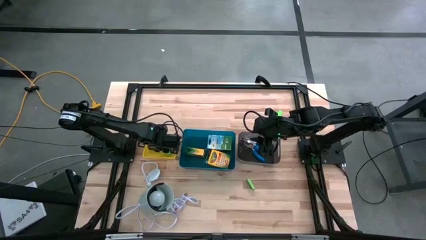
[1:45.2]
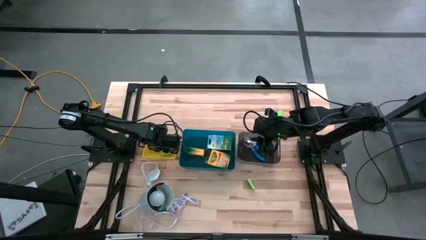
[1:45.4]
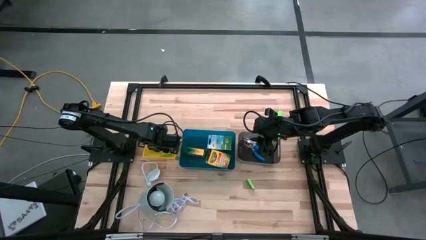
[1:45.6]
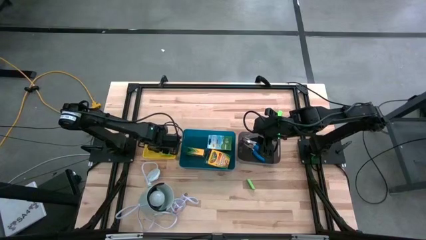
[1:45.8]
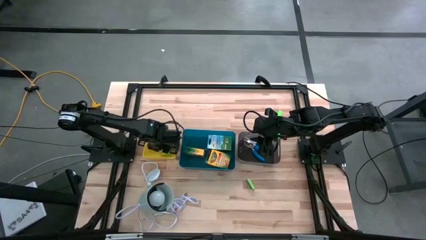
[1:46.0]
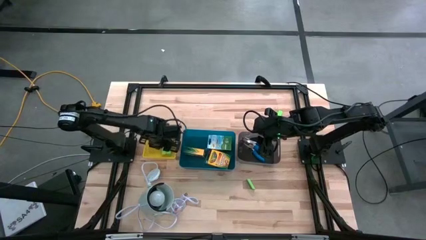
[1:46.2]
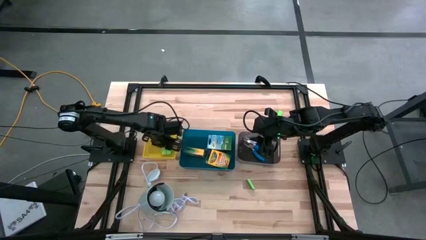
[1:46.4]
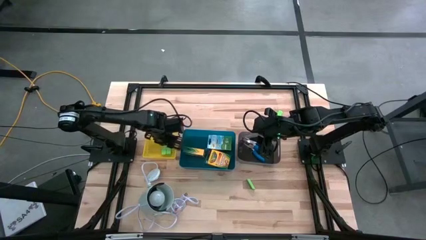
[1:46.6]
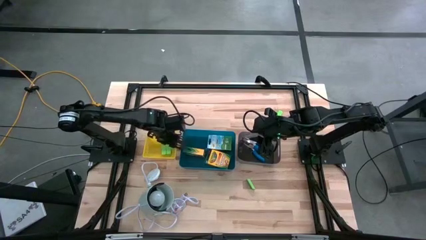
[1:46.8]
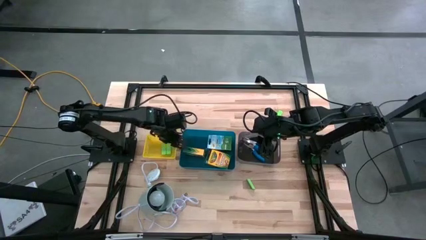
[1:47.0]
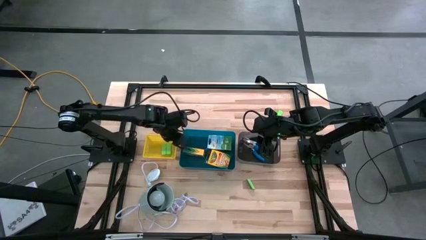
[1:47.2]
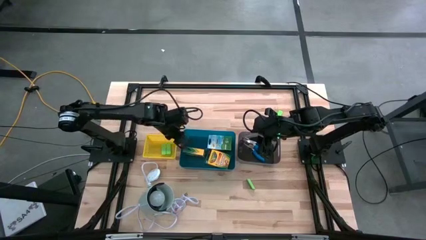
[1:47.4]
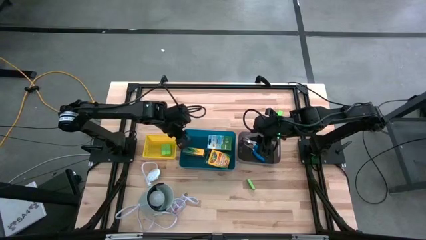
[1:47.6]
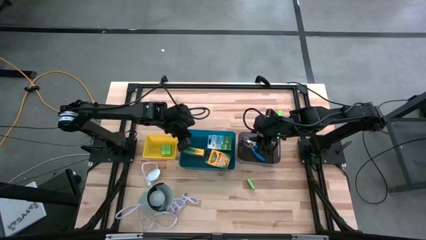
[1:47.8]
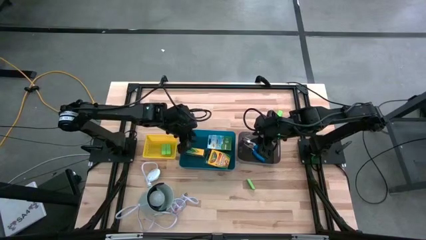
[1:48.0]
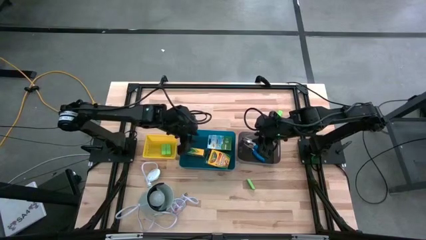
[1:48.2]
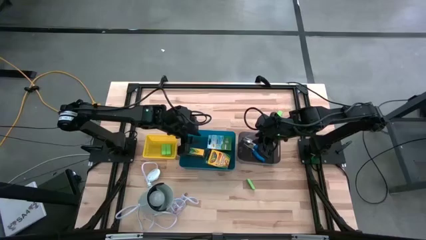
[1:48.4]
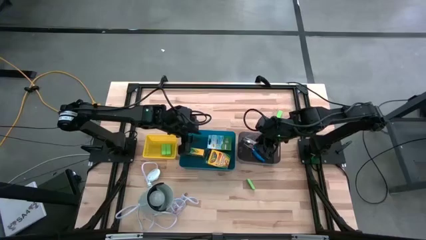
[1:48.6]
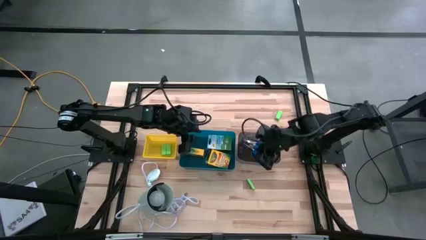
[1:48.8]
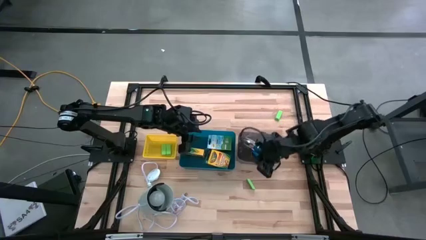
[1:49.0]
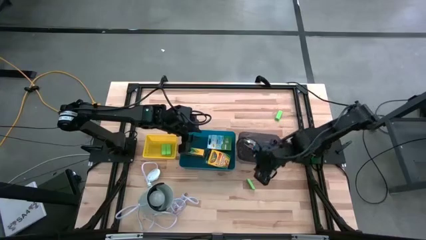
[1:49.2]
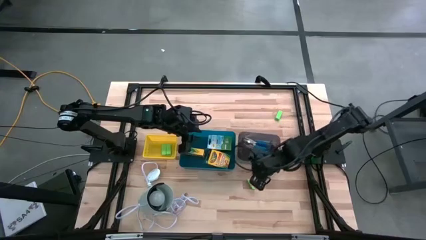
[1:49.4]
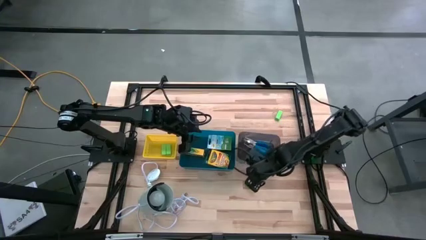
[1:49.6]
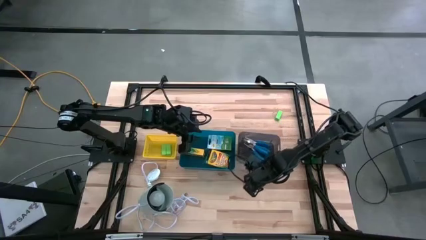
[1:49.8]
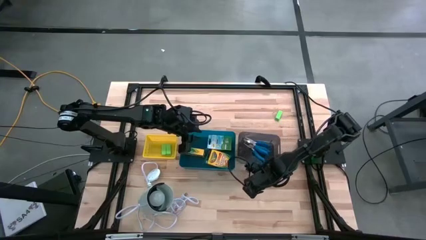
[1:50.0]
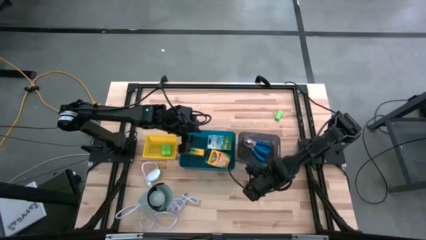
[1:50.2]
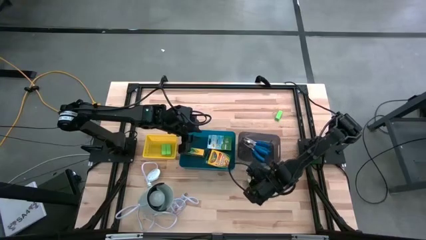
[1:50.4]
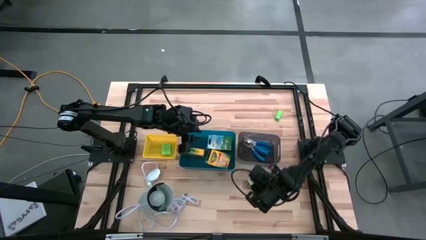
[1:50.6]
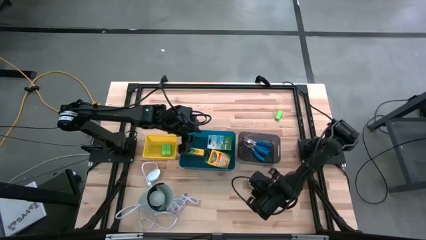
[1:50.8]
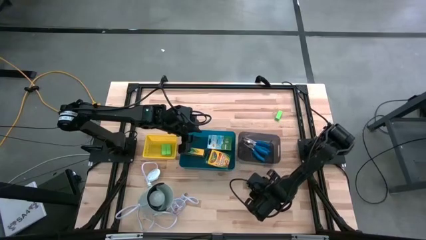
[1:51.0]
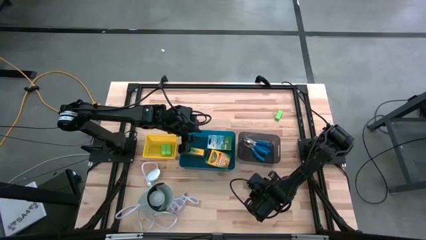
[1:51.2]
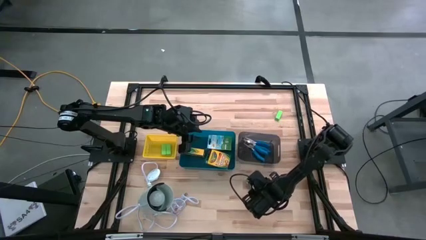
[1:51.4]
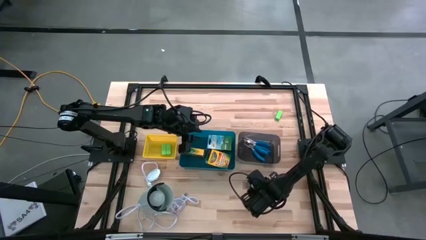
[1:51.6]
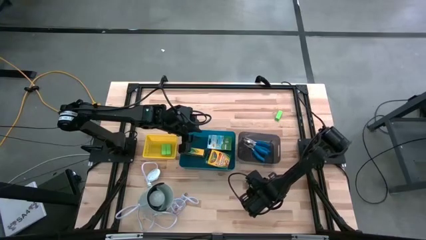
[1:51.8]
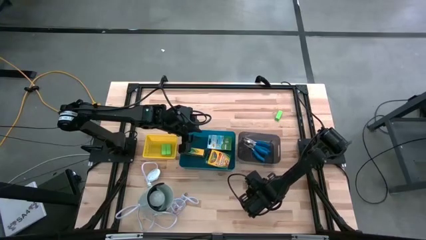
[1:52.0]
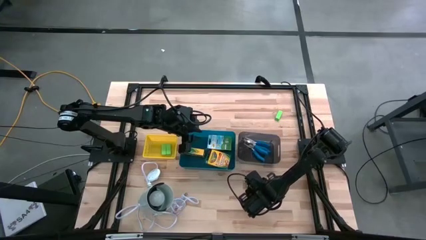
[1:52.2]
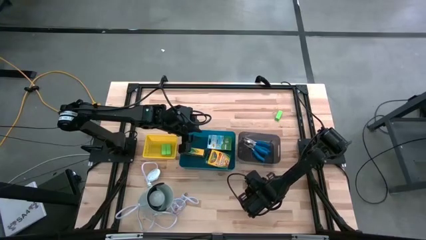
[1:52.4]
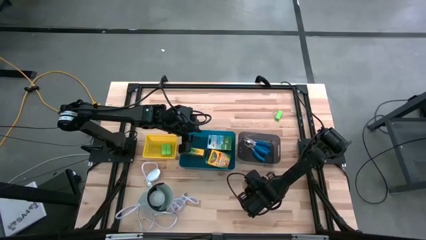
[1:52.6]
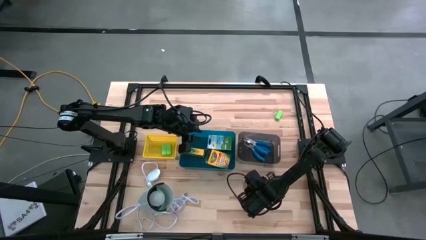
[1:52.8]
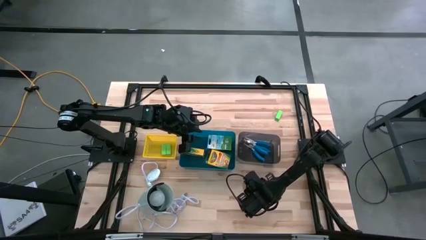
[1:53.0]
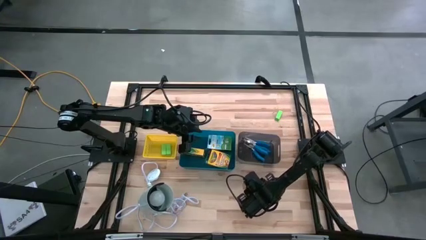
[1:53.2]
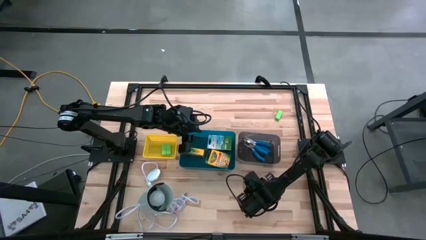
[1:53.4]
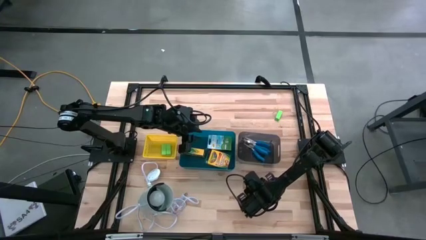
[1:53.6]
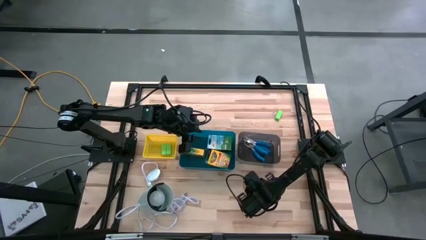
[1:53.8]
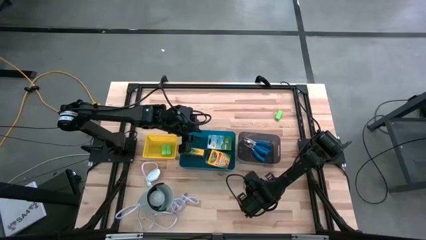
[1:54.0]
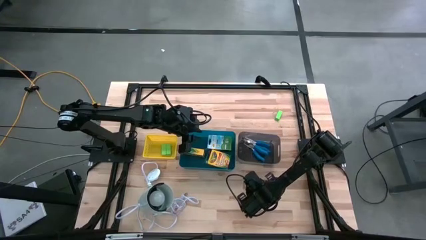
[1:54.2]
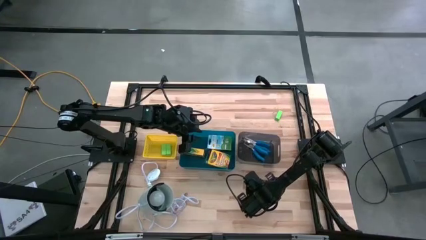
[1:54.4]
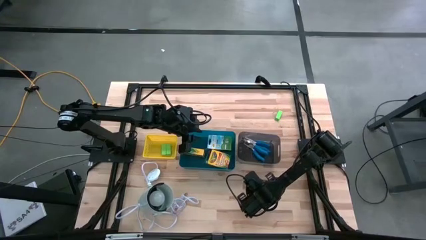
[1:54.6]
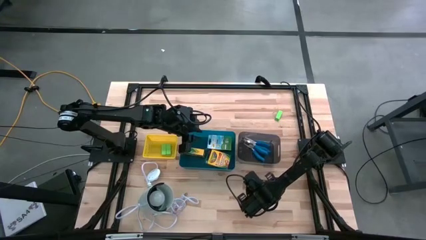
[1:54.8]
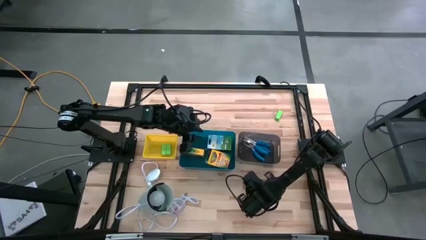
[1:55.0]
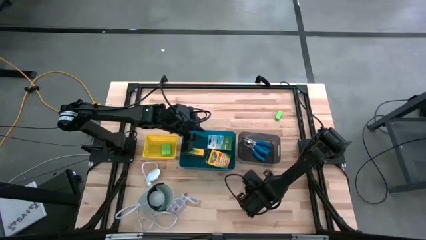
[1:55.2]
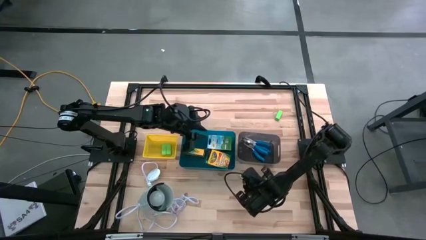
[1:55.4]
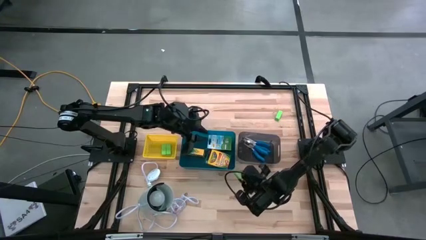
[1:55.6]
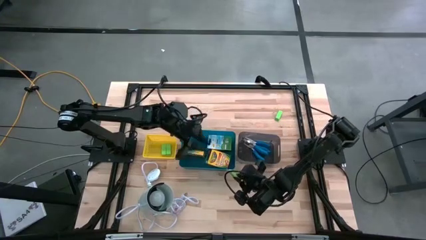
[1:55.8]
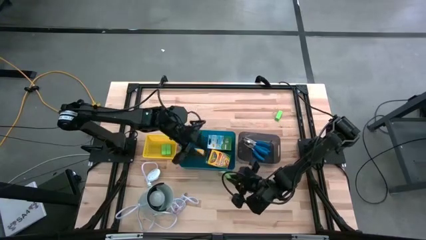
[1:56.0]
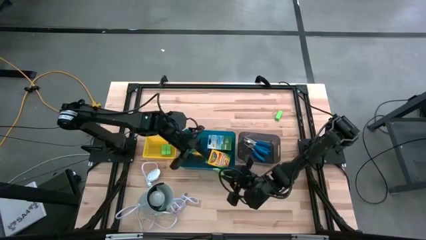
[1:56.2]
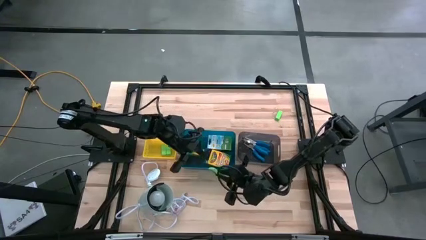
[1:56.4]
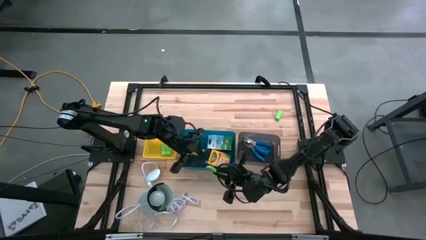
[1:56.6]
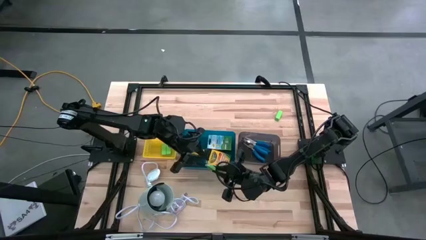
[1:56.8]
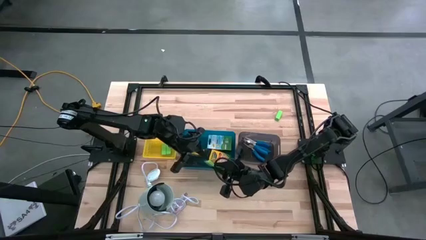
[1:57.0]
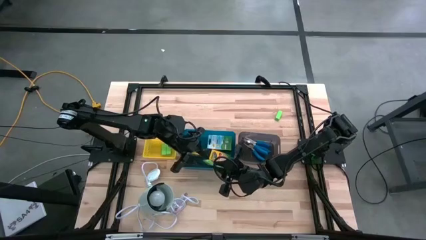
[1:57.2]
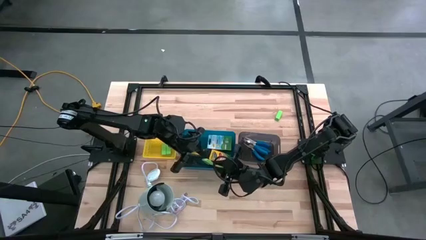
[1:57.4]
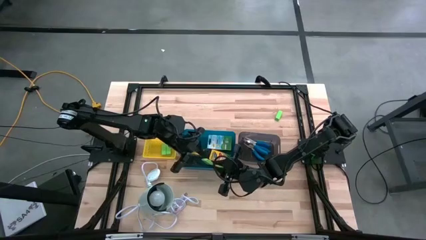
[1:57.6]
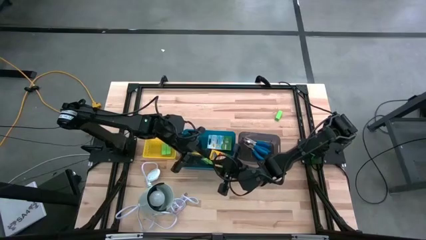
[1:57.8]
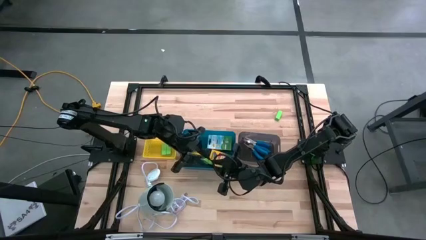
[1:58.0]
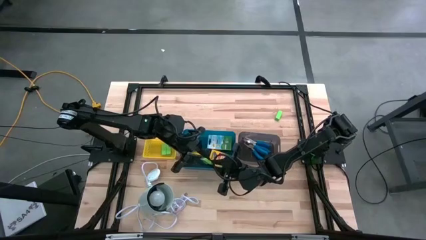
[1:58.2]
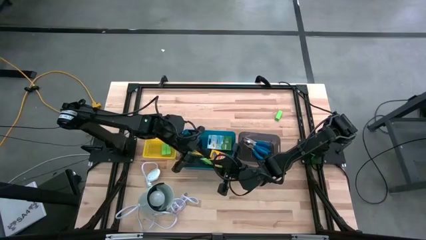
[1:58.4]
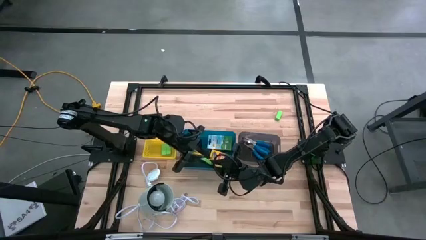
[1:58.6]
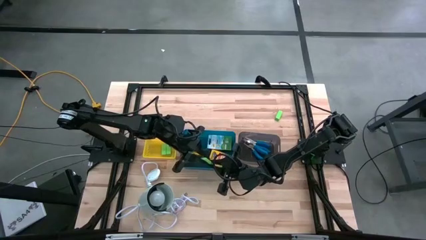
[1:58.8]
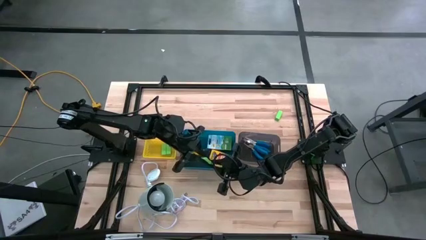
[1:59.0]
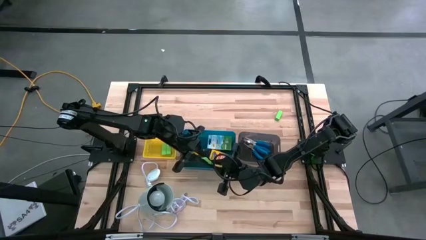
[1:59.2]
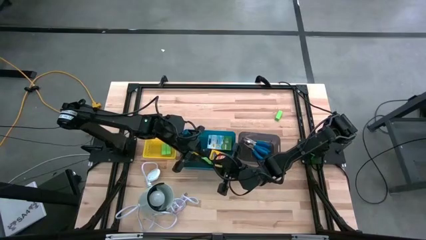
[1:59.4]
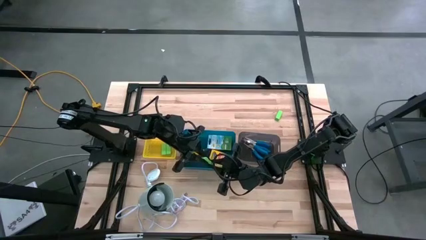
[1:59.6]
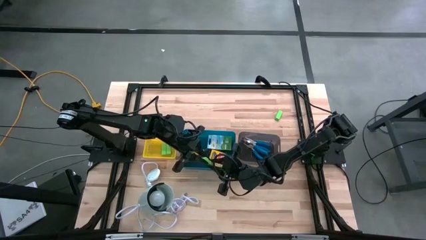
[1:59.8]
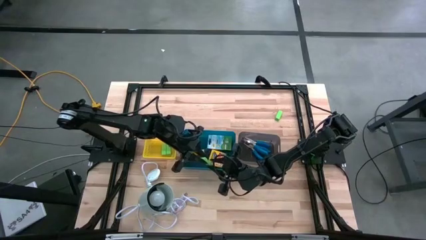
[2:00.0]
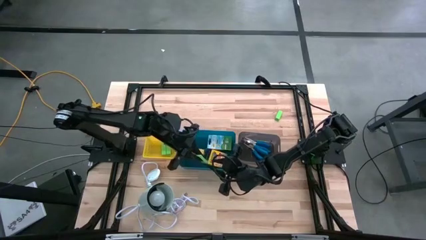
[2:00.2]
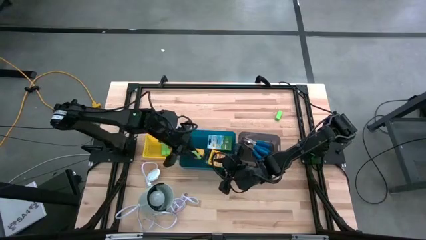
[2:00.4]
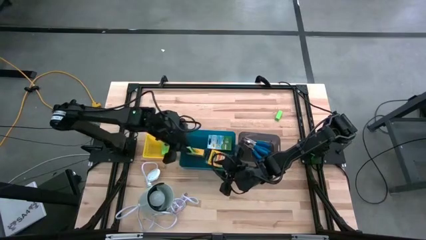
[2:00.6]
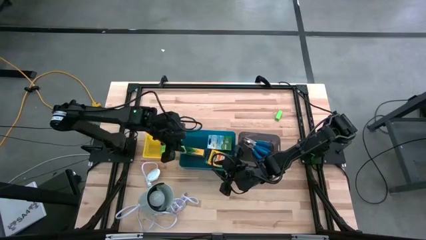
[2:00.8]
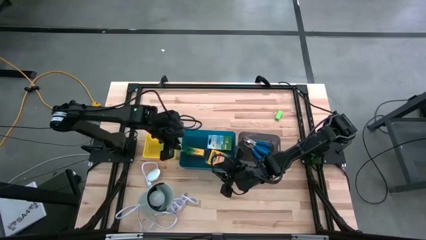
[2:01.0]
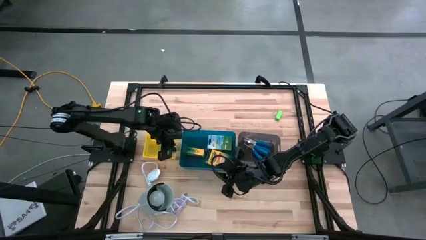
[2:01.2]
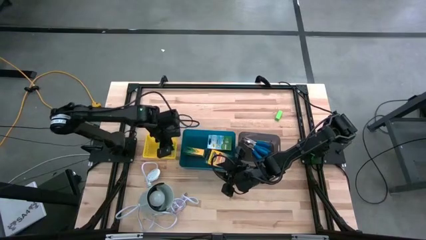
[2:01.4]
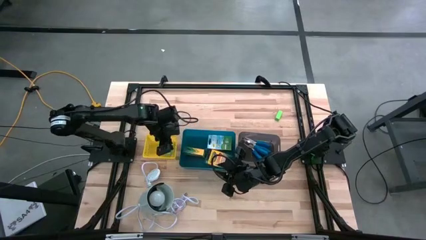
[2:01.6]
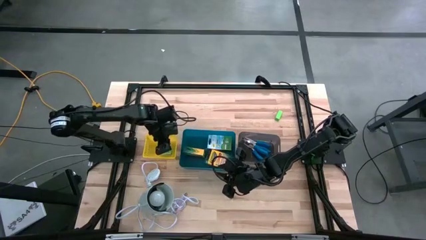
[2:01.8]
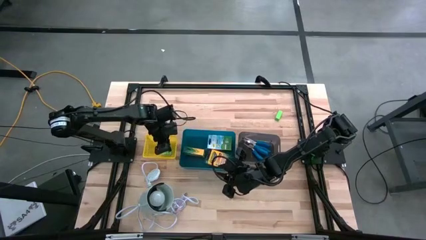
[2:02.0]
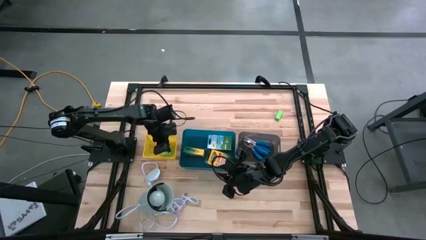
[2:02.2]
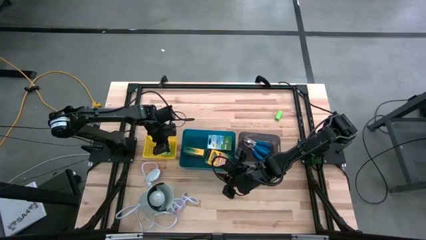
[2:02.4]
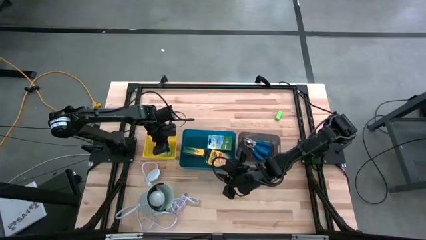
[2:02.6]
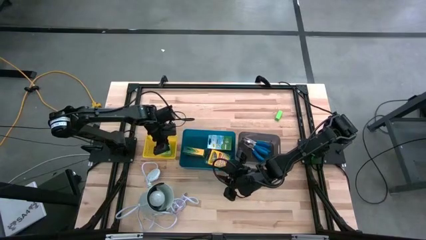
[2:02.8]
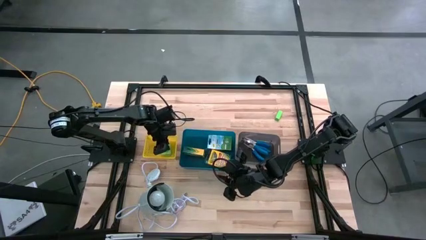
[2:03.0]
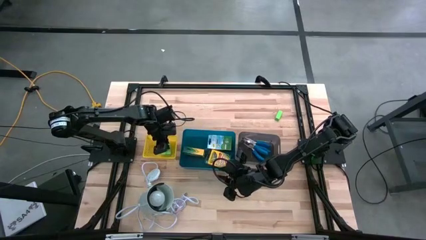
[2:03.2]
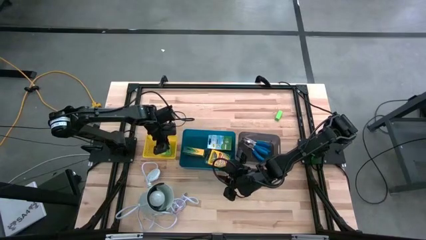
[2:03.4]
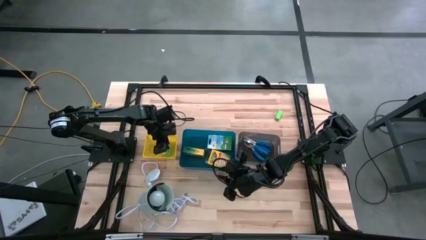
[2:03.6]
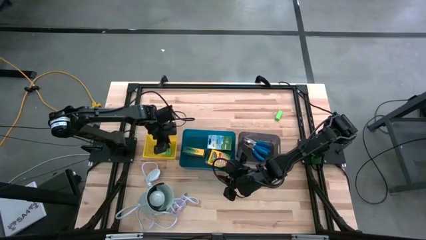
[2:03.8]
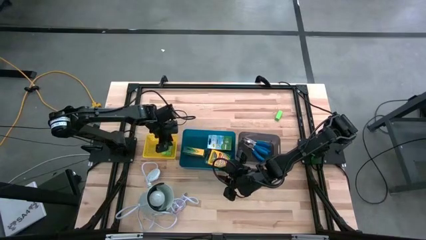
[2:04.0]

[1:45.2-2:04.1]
Task: Pick & Place School Supplies
Put the green eraser into the yellow bin
